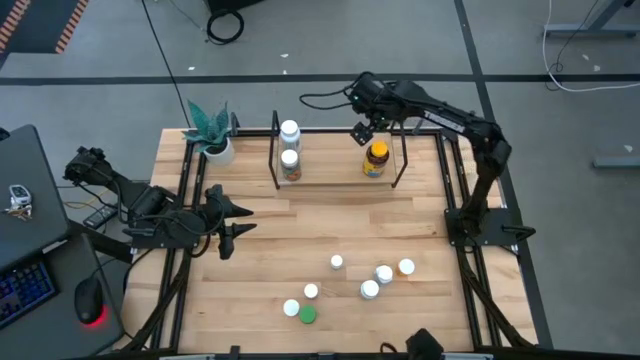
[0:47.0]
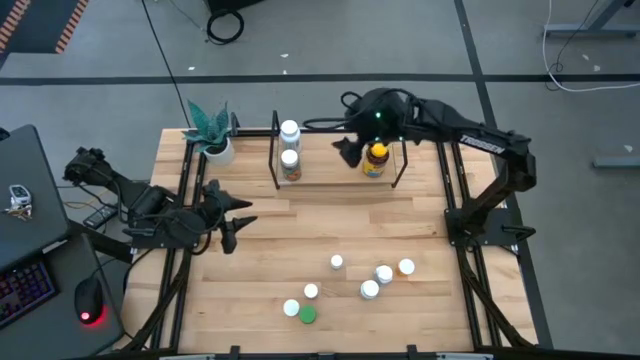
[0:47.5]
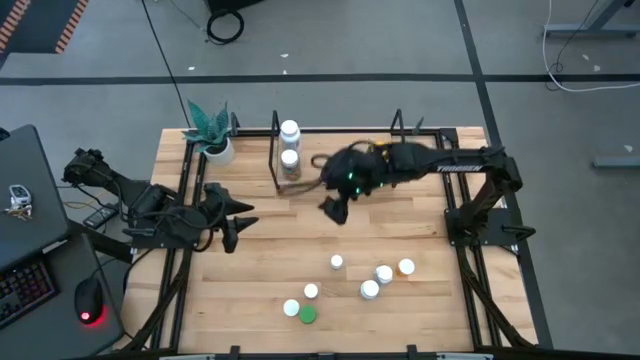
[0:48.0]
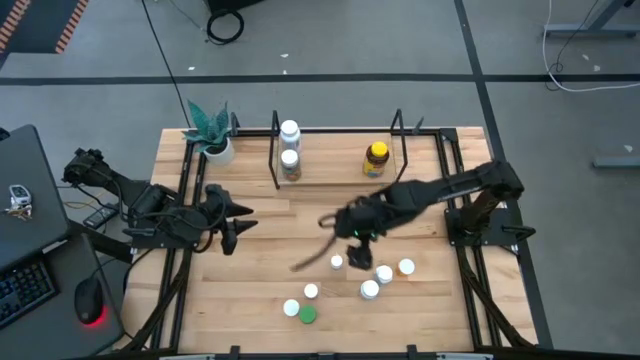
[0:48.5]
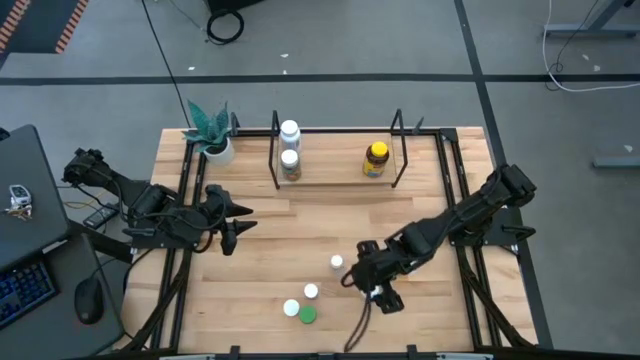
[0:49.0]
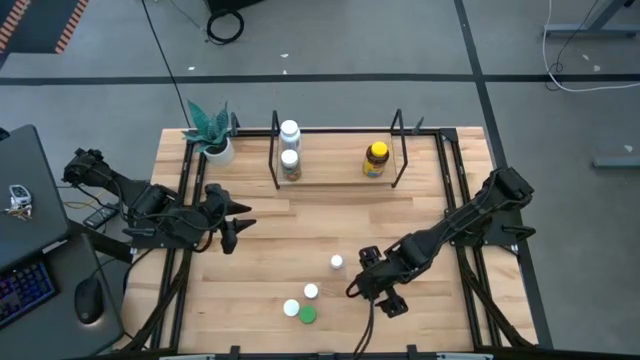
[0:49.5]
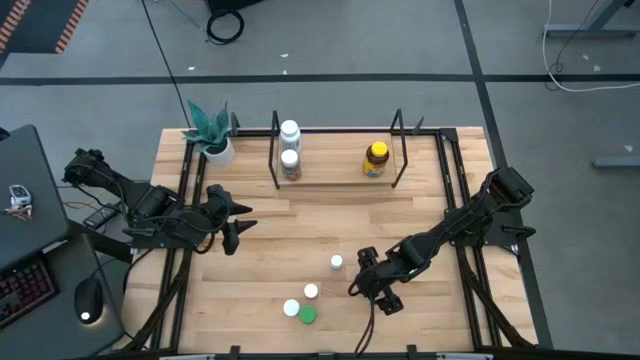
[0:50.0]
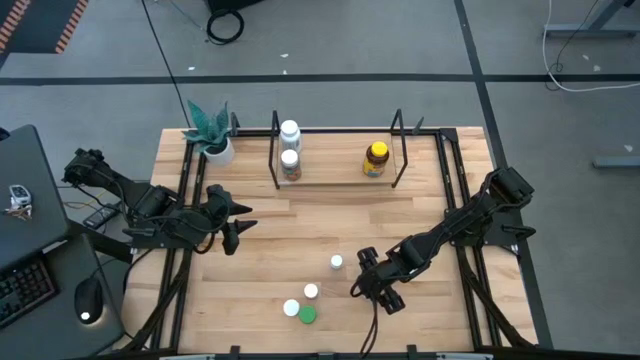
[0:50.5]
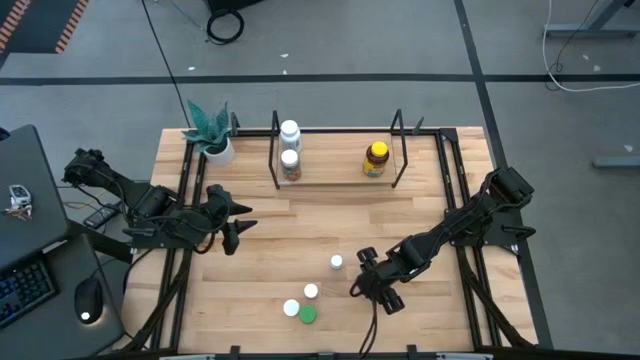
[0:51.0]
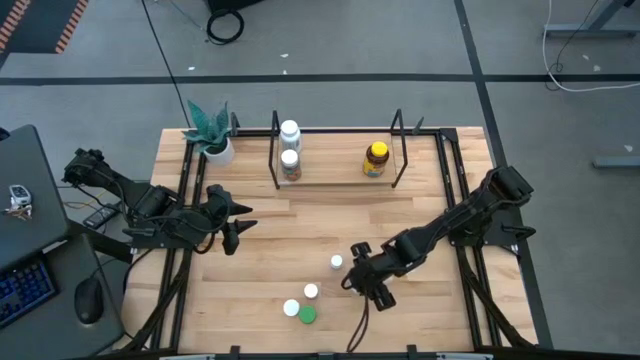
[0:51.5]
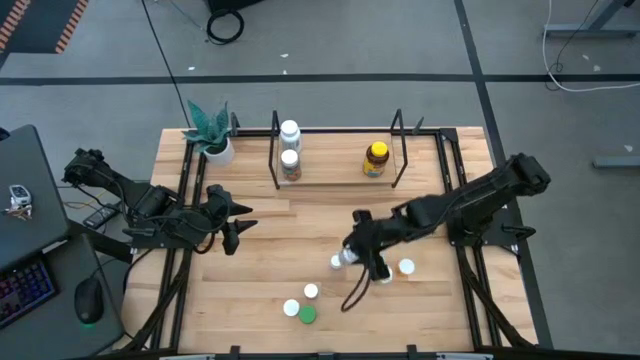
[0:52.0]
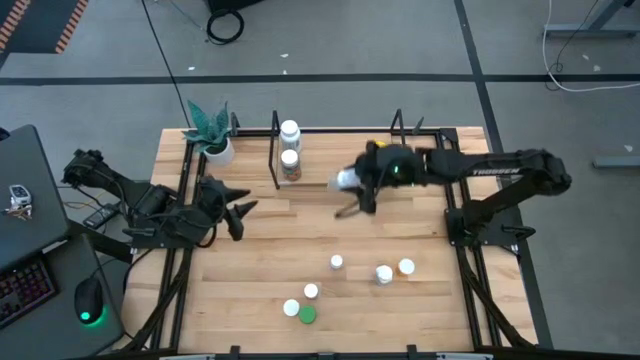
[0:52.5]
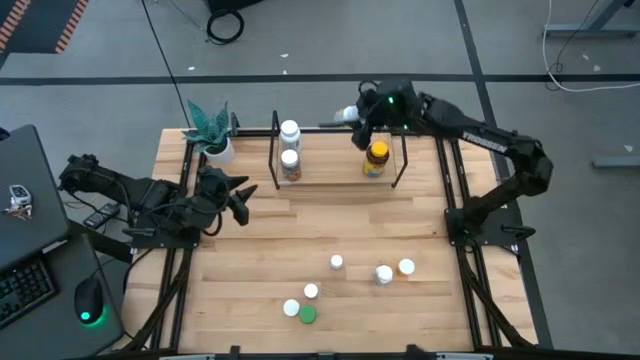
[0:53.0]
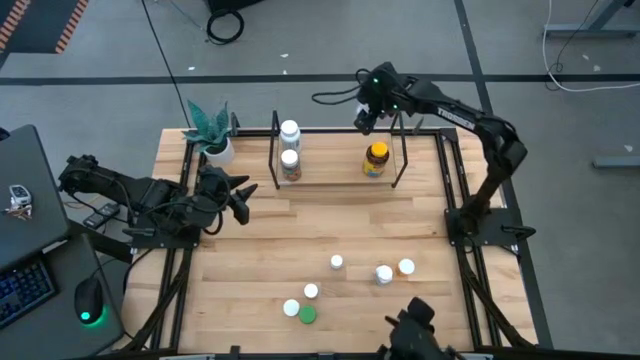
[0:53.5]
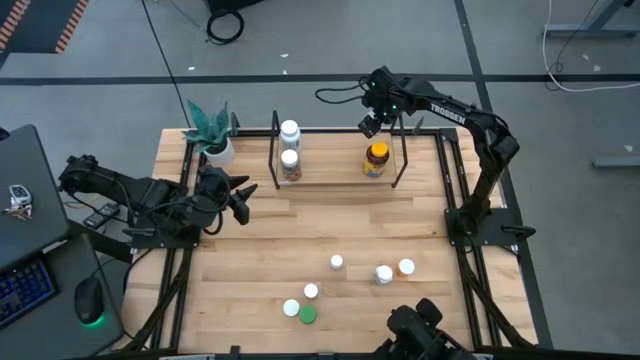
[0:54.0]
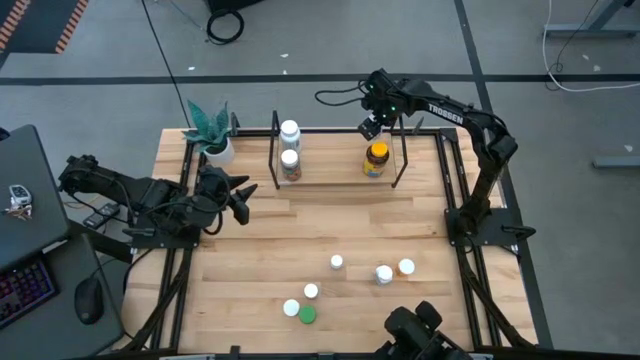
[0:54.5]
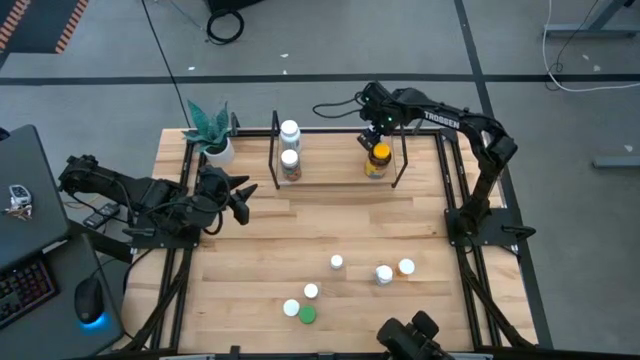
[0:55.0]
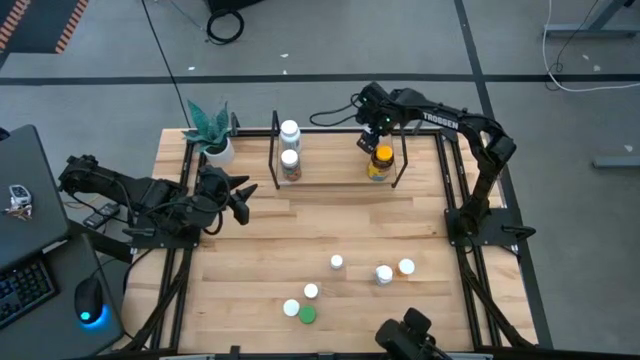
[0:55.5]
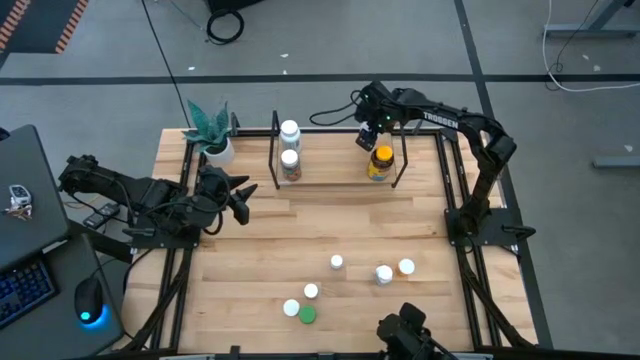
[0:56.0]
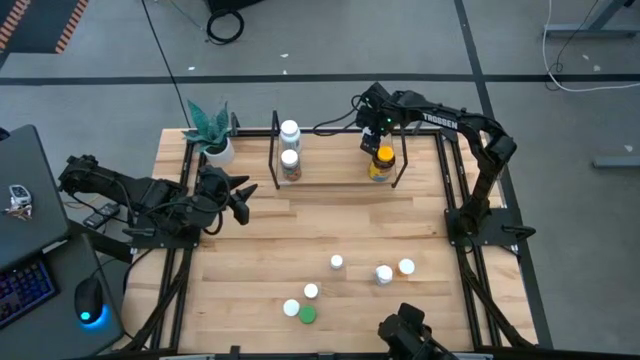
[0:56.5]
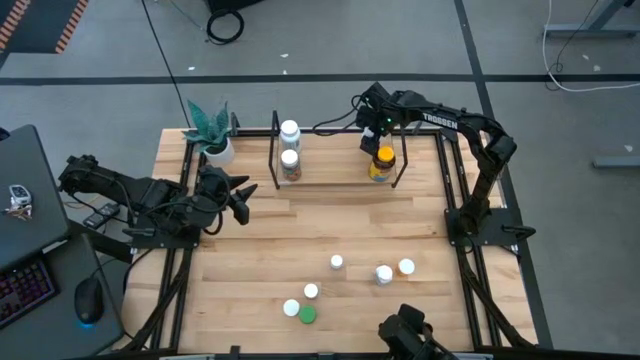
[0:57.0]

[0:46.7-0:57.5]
Task: Pick and place medicine bottles onto shelf by color
Put the large white pill bottle on the shelf

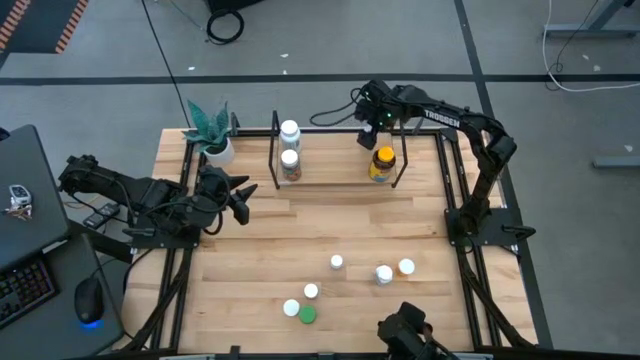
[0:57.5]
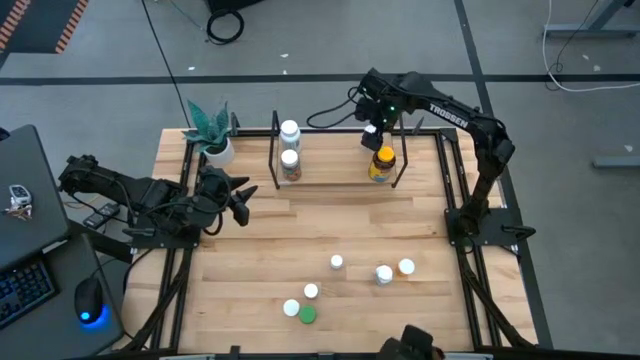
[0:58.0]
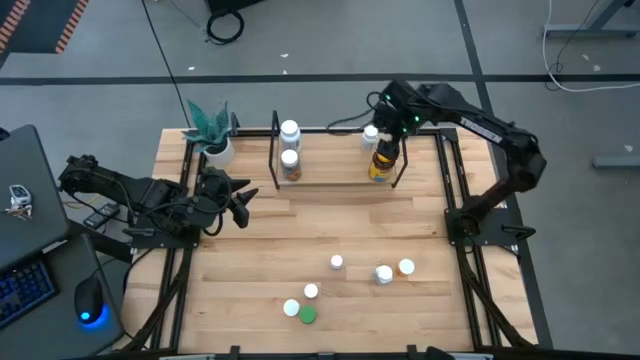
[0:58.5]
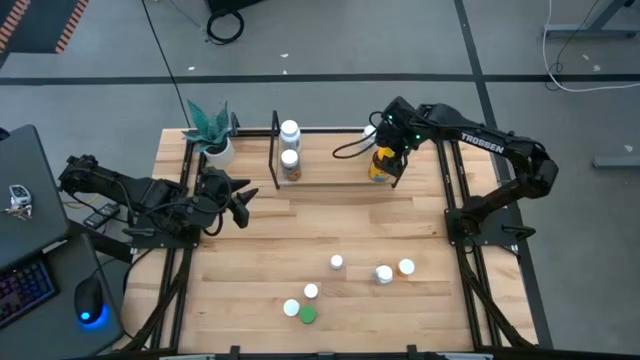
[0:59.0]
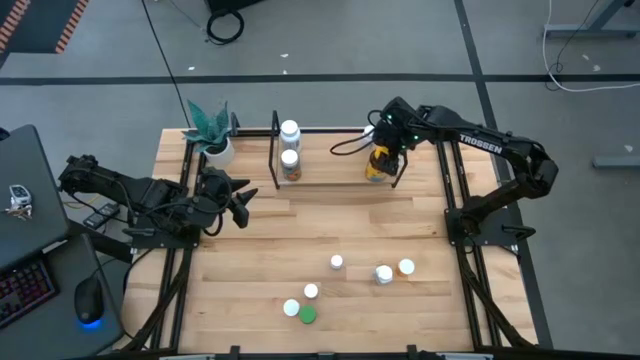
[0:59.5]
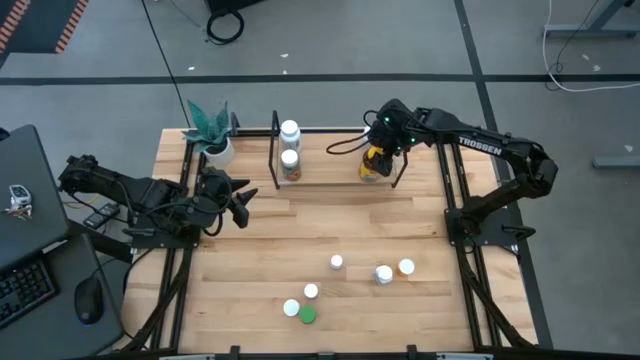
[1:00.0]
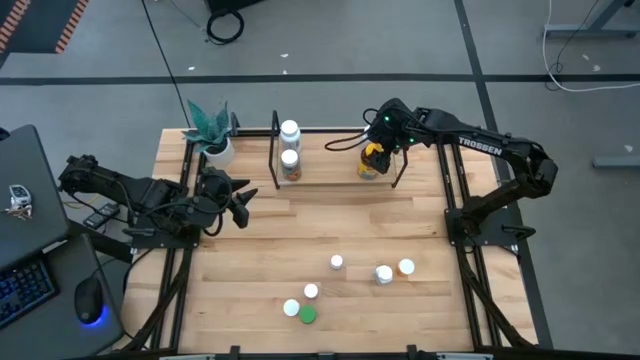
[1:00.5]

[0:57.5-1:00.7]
Adjust the yellow pill bottle on the shelf

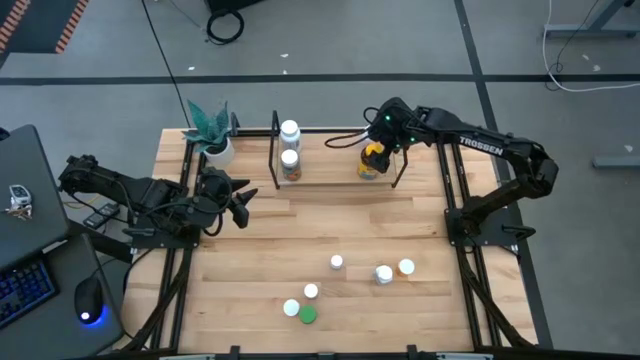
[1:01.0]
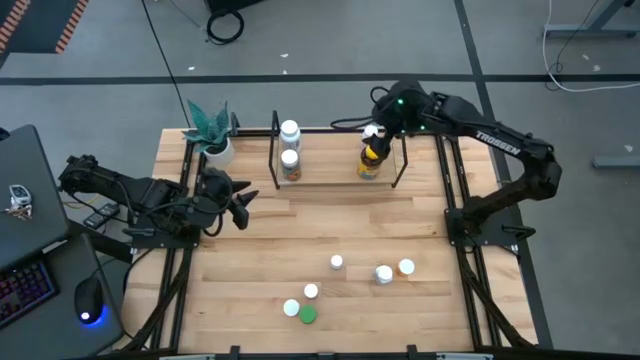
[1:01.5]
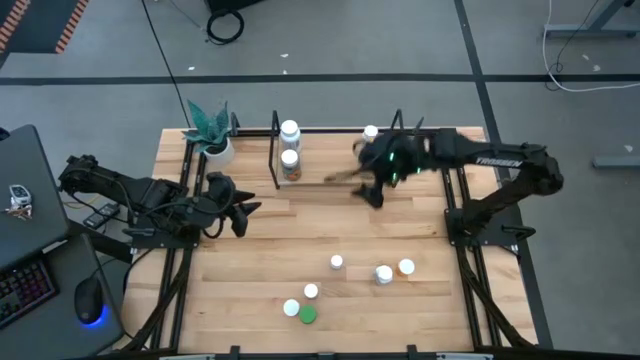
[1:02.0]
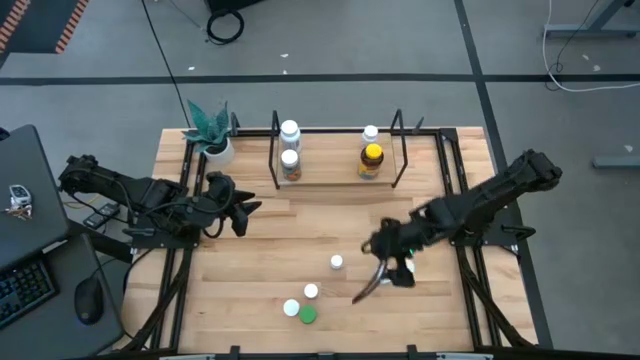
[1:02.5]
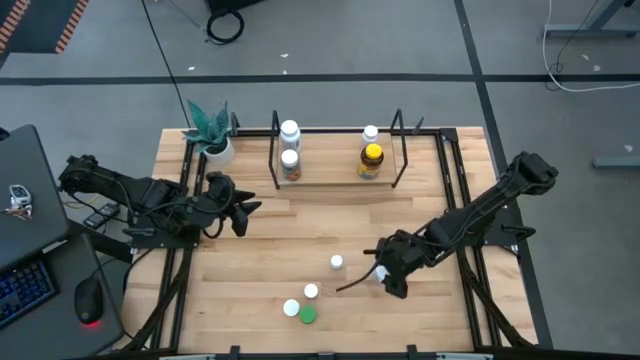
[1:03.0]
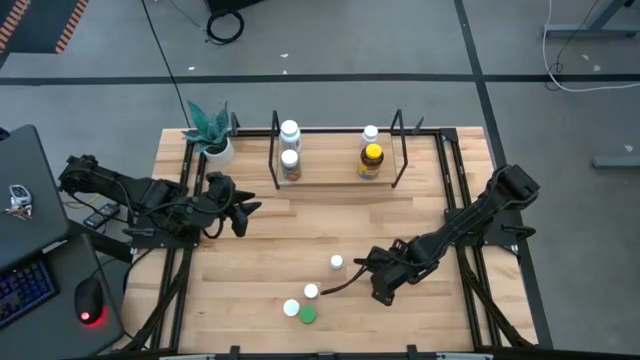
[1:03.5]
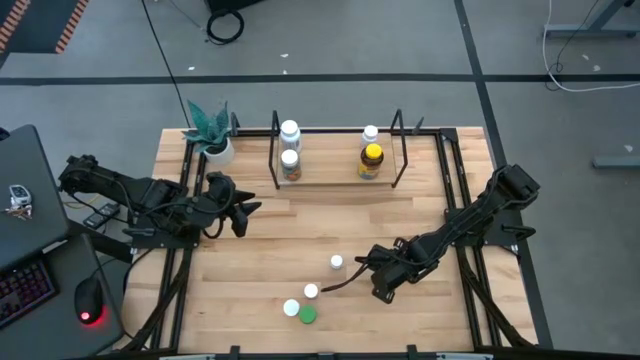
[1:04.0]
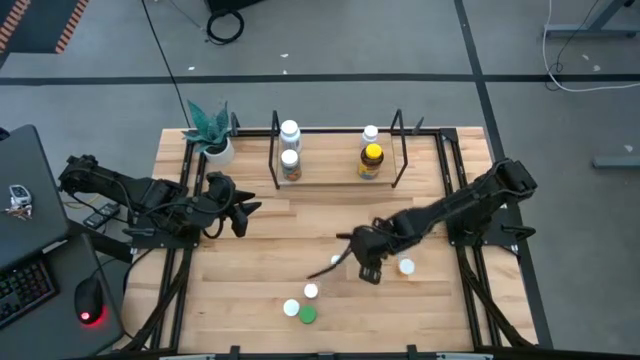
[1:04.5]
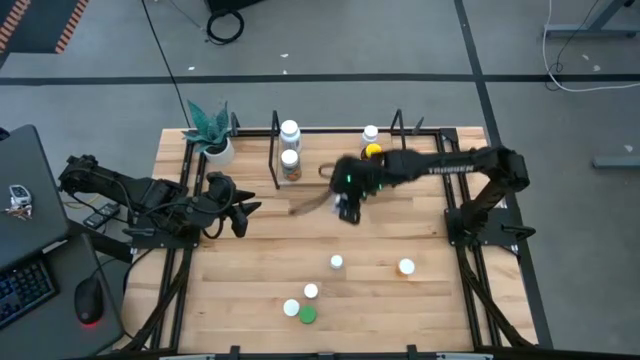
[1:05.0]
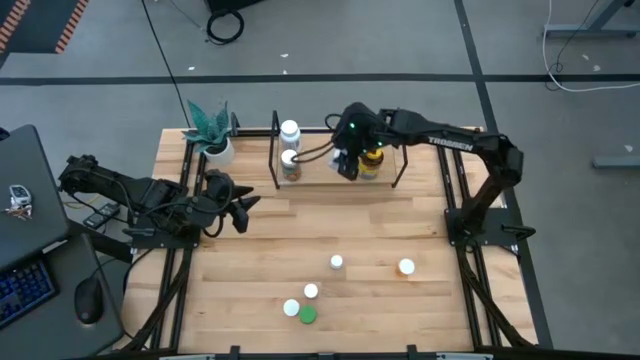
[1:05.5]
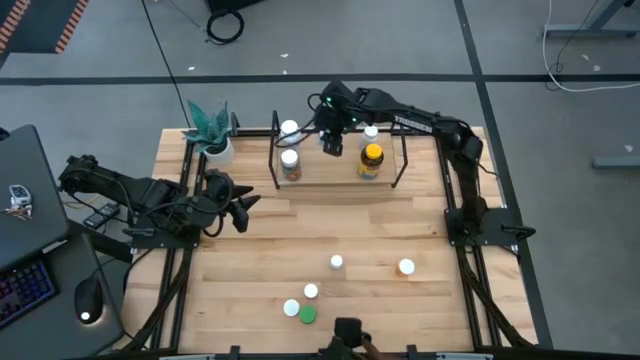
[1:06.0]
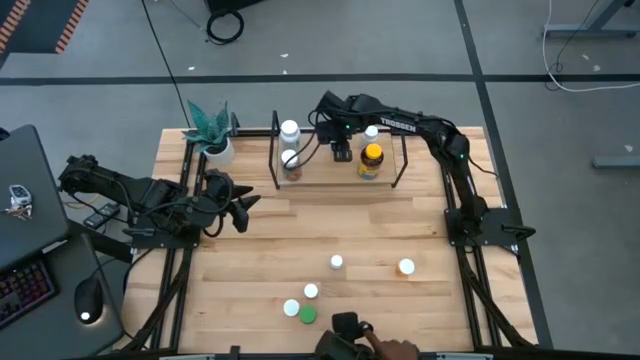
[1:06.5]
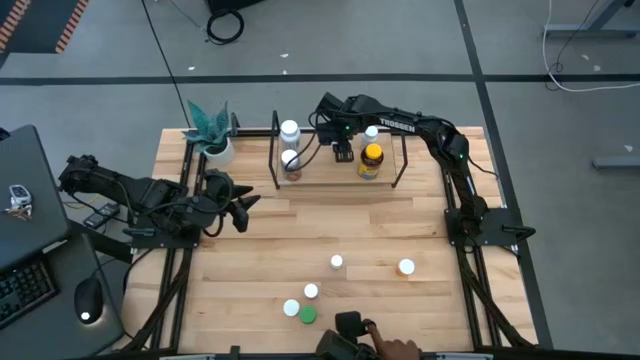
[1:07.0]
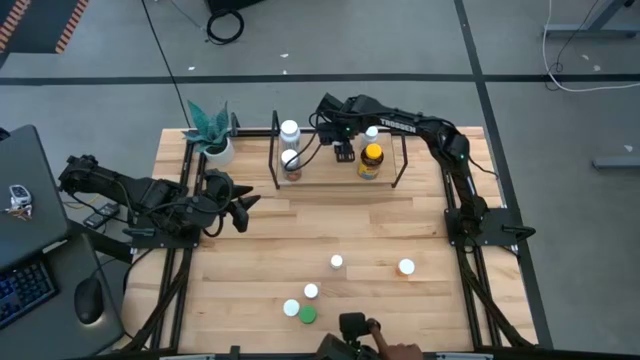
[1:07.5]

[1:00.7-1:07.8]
Put the blue pill bottle on the shelf

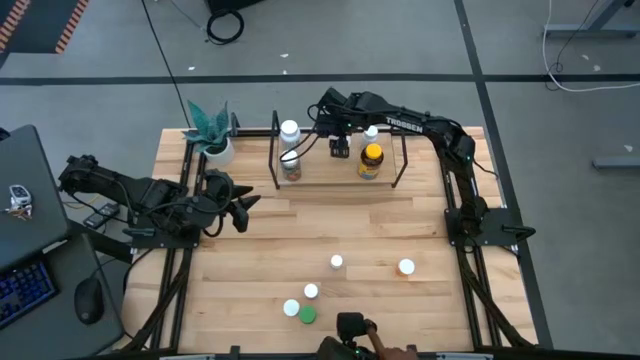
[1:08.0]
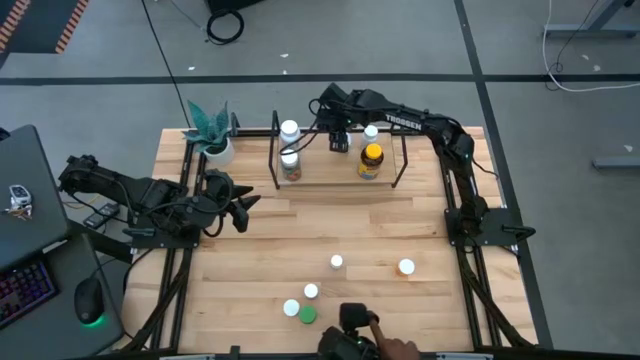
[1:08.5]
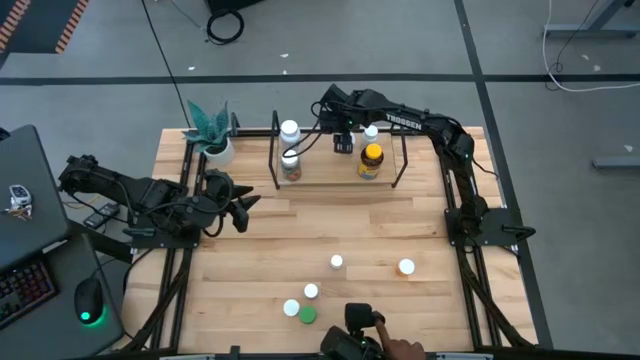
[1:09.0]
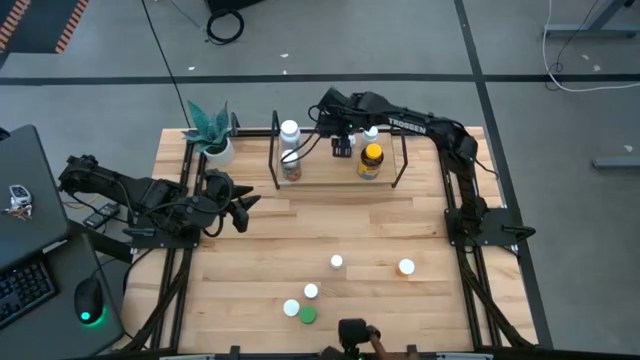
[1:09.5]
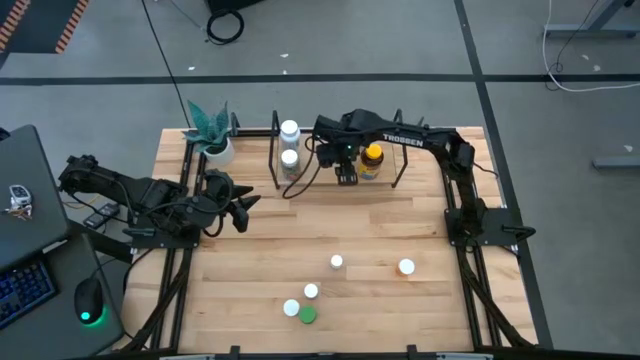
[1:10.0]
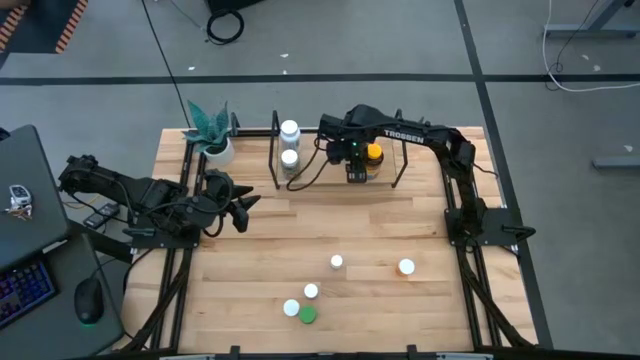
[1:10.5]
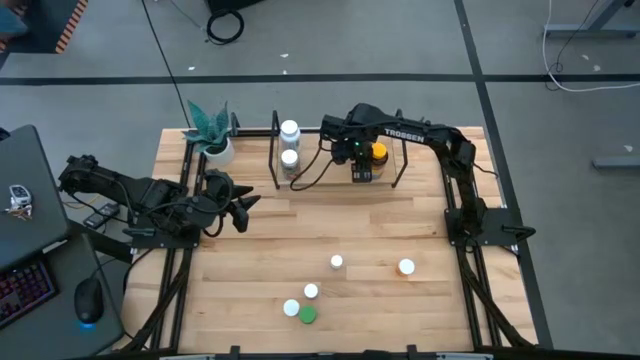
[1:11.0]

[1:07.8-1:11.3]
Adjust the yellow pill bottle on the shelf
